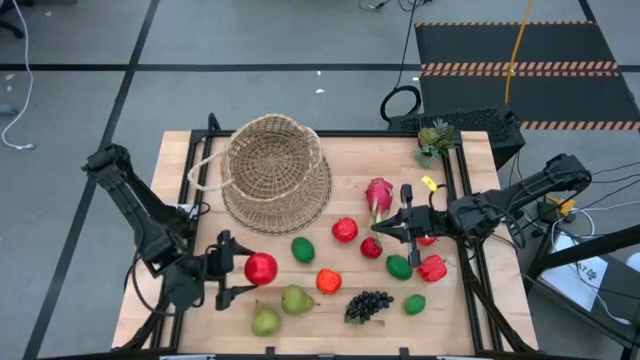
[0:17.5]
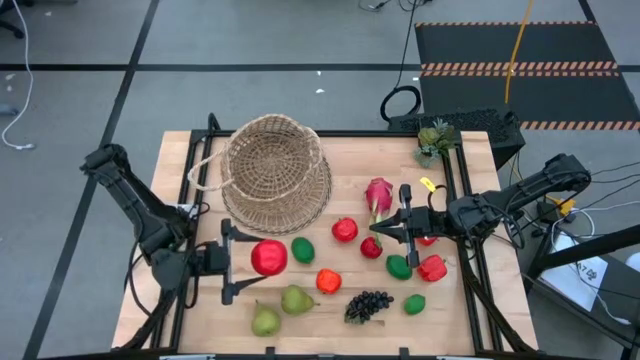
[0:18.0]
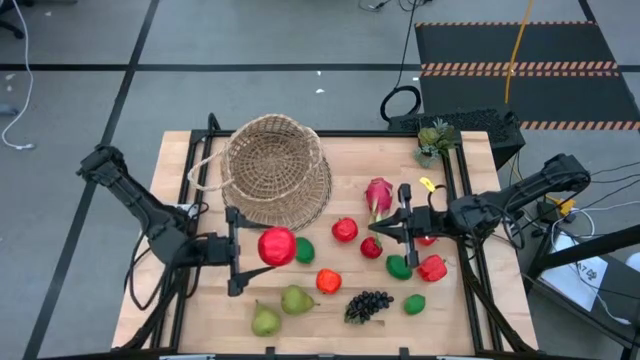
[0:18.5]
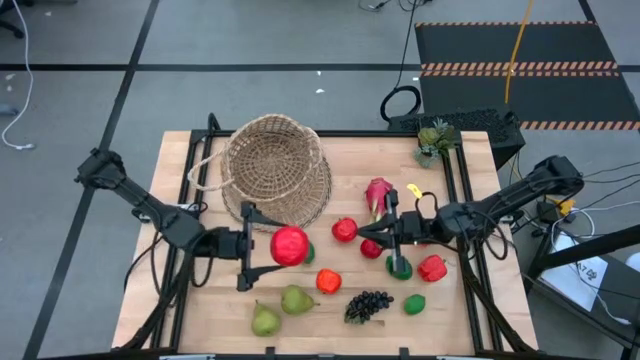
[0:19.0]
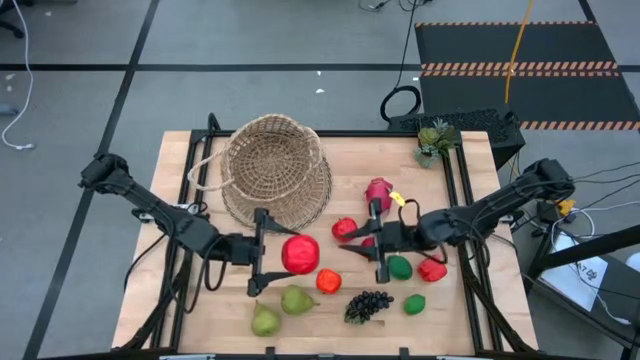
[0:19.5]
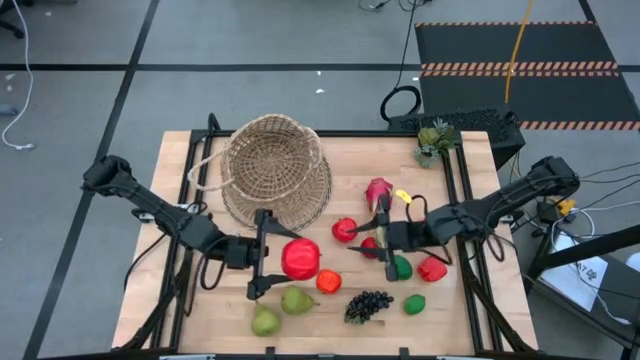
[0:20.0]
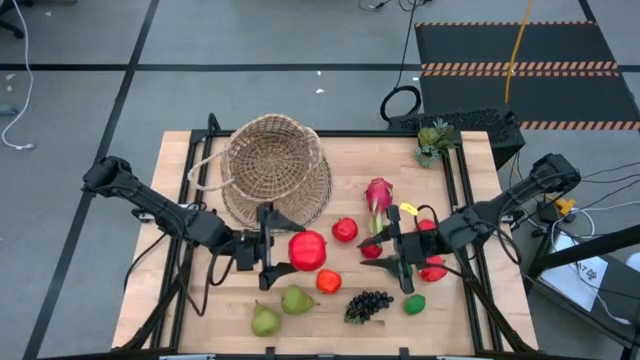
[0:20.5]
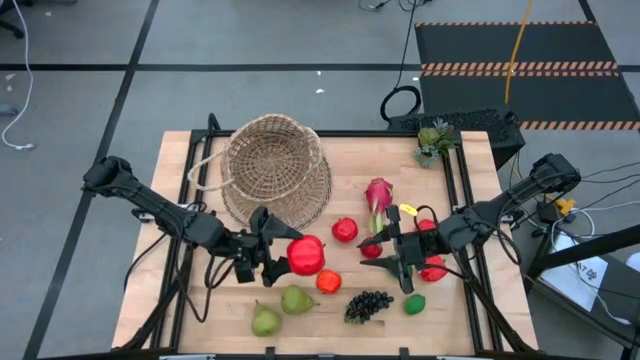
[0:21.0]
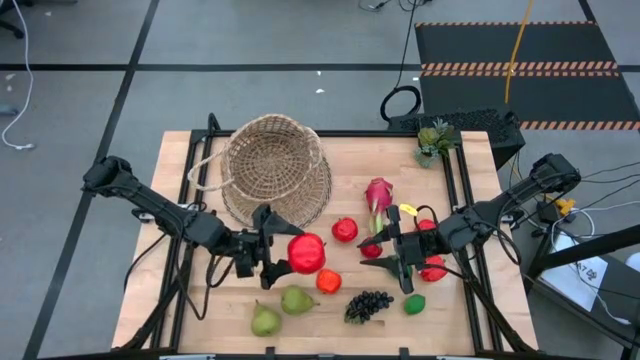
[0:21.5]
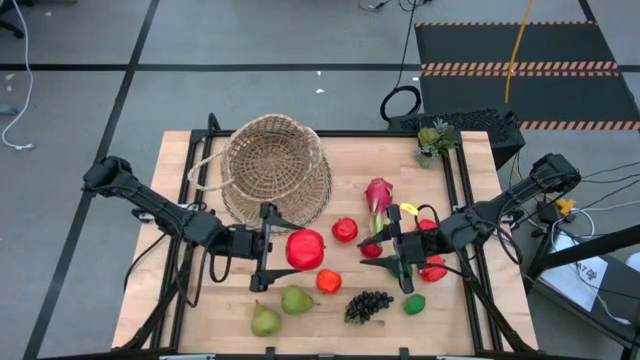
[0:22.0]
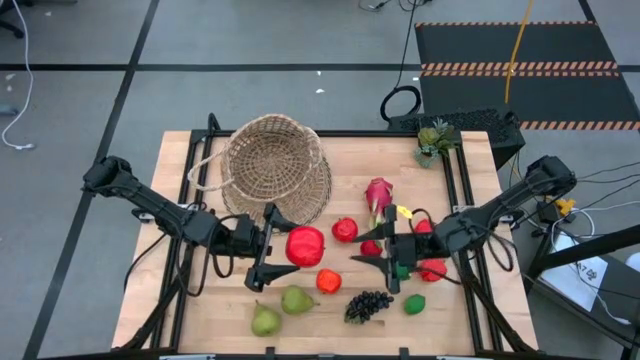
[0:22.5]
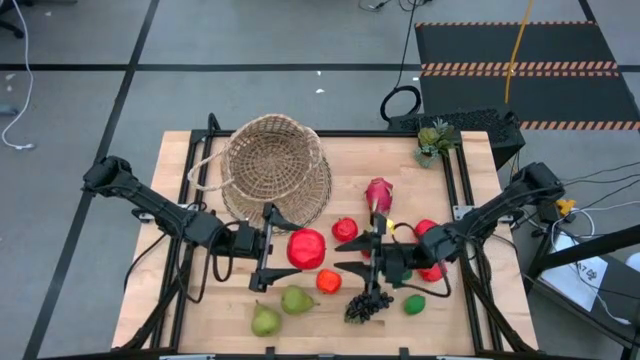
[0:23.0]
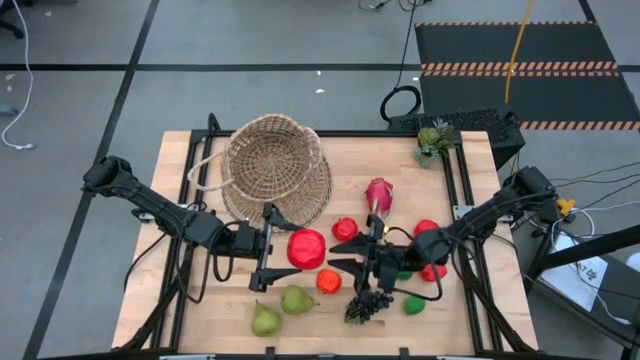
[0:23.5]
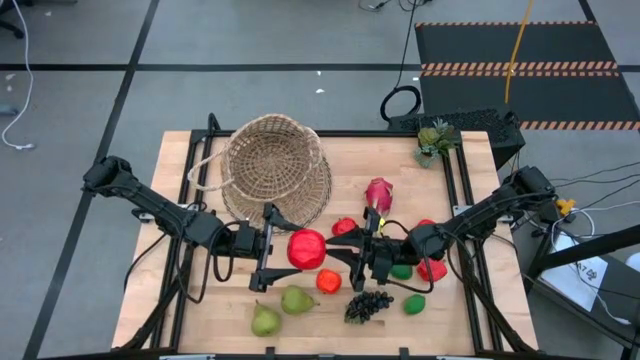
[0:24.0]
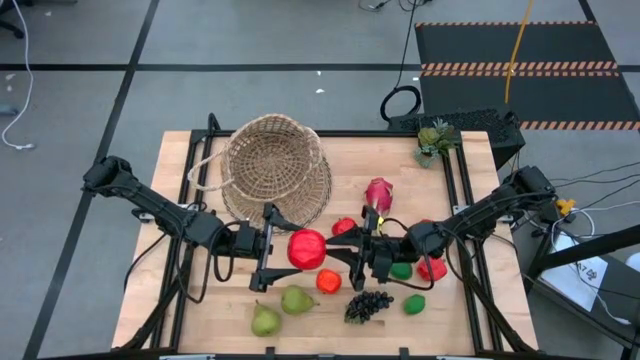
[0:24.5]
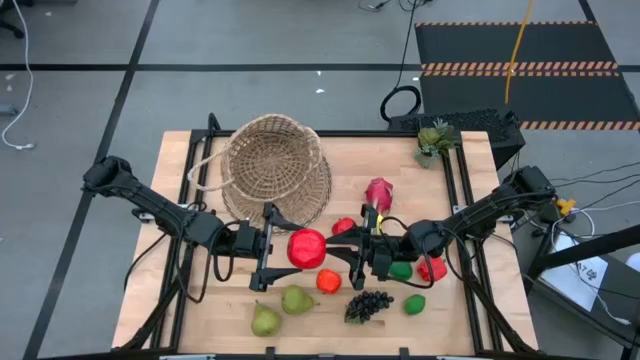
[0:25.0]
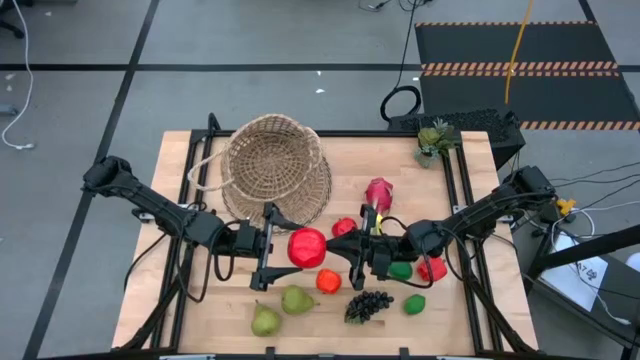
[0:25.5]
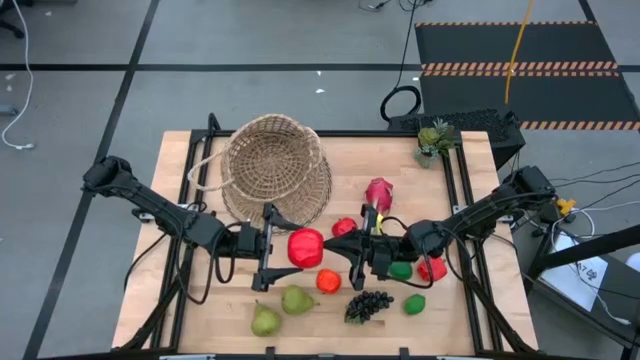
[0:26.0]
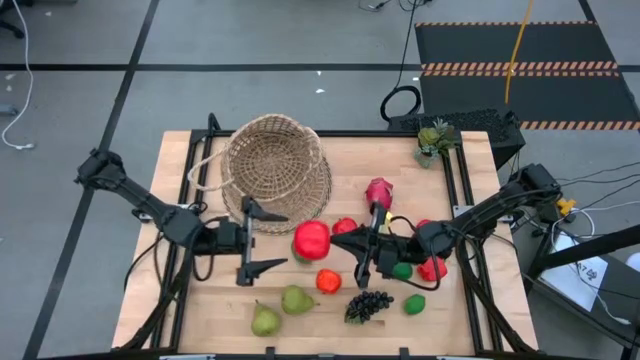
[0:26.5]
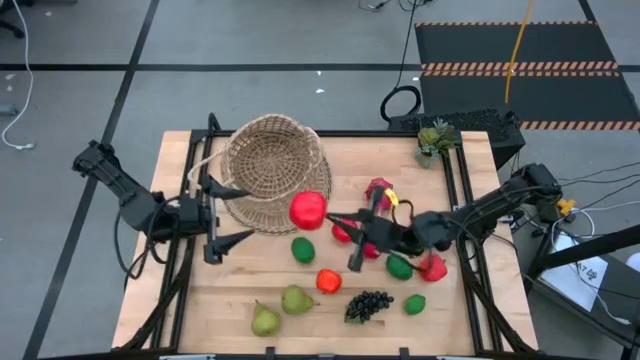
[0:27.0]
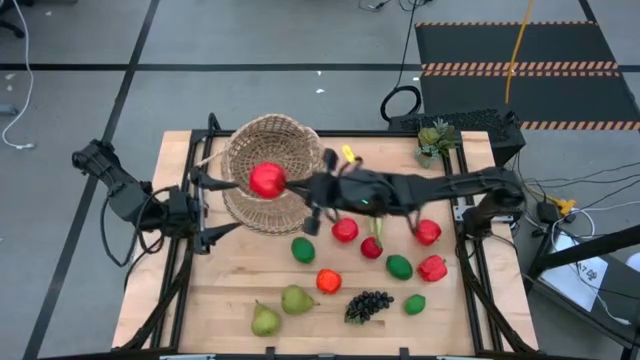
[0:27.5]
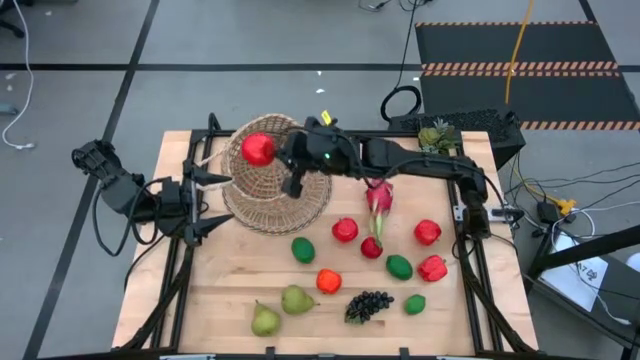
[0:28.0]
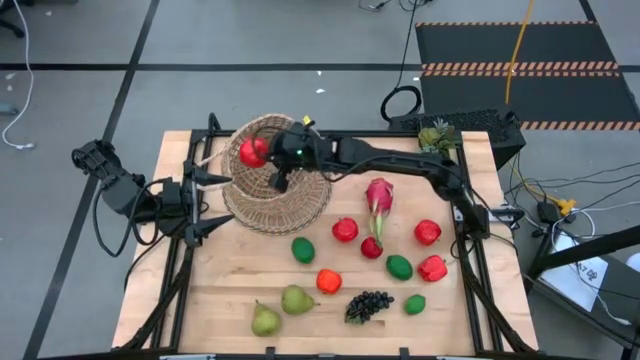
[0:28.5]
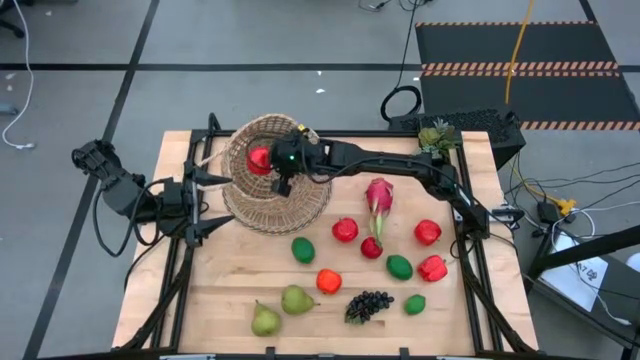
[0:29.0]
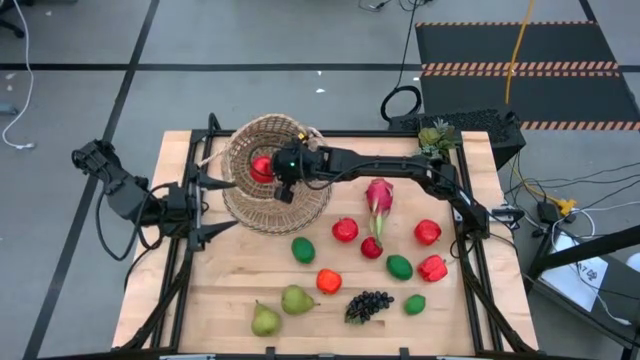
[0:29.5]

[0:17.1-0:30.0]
Task: Build produce basket
Put the apple into the basket

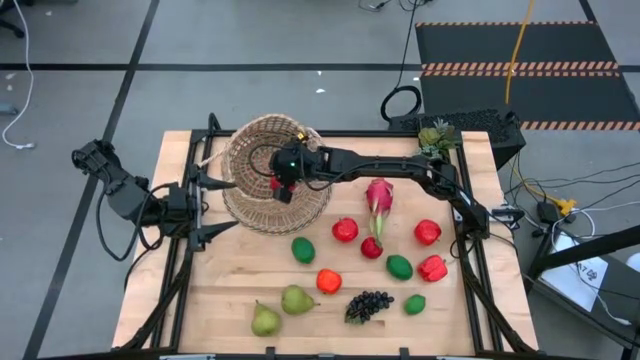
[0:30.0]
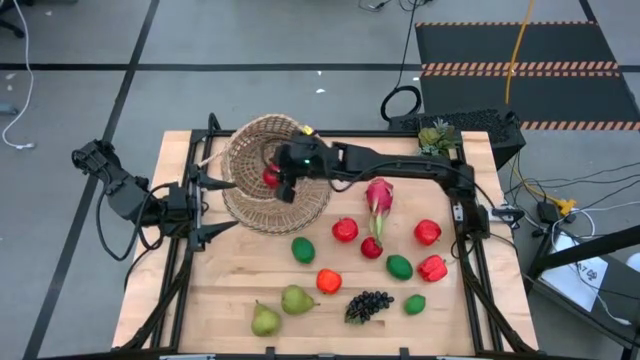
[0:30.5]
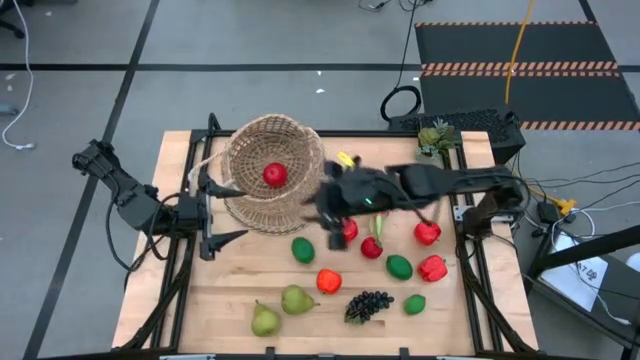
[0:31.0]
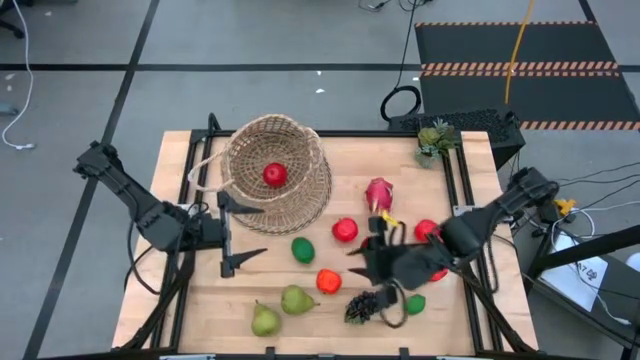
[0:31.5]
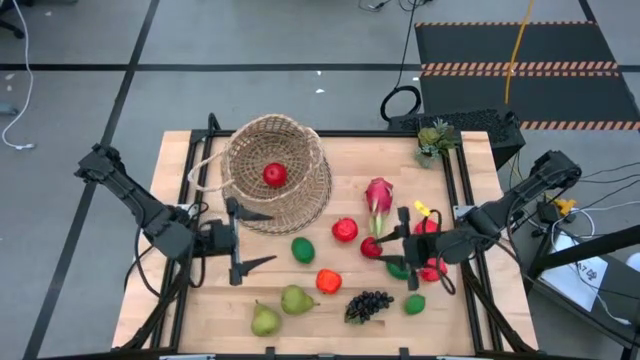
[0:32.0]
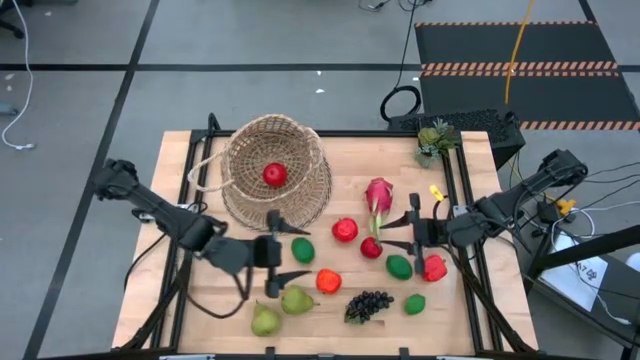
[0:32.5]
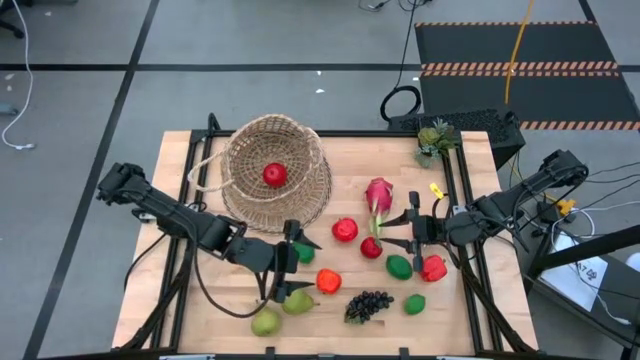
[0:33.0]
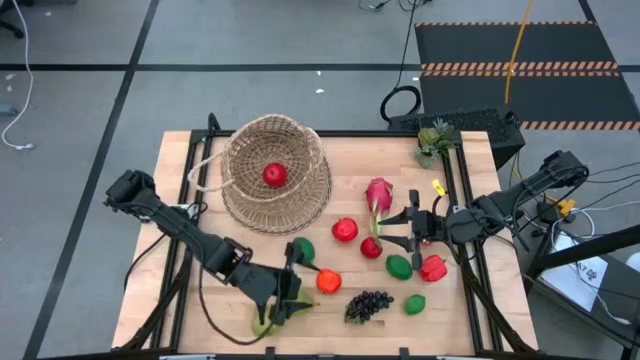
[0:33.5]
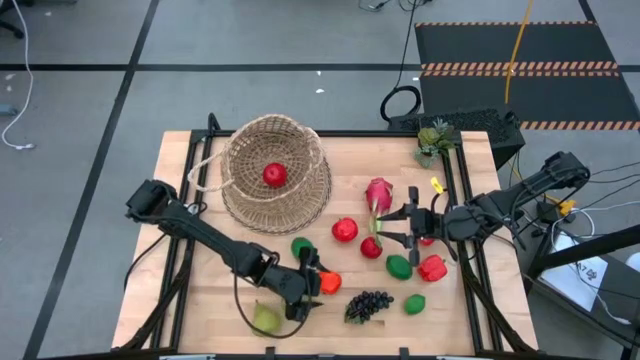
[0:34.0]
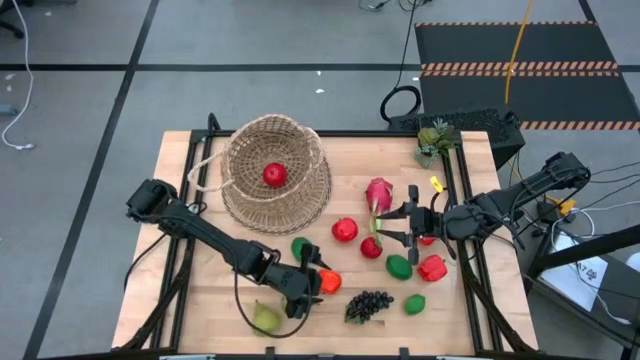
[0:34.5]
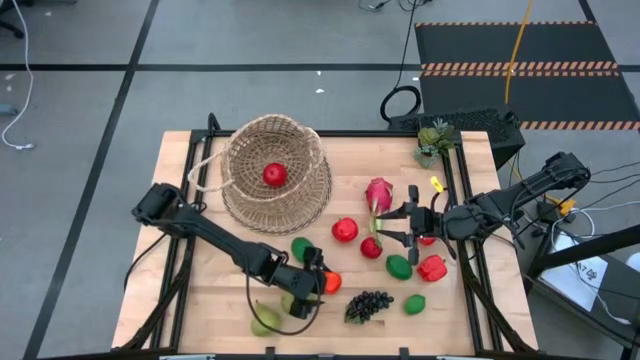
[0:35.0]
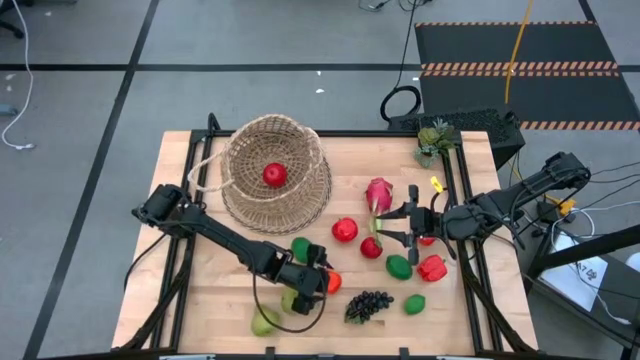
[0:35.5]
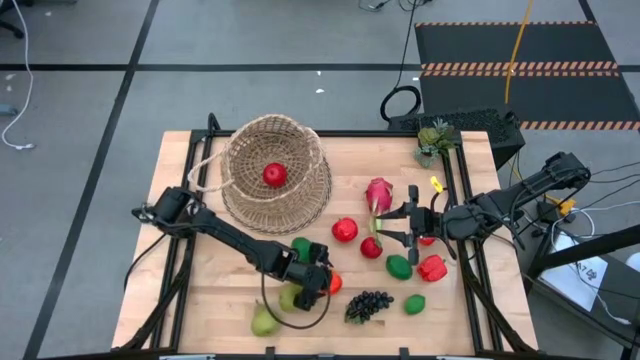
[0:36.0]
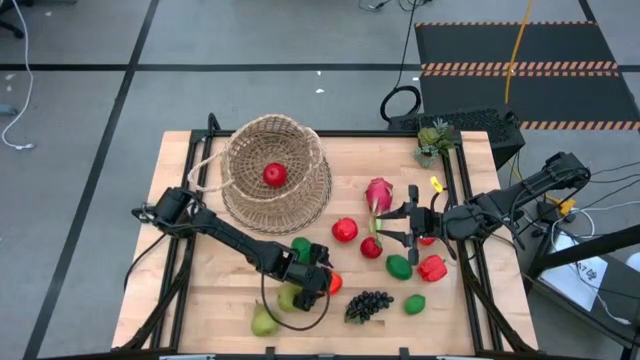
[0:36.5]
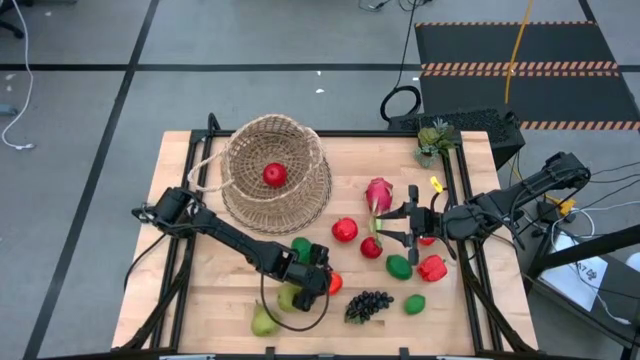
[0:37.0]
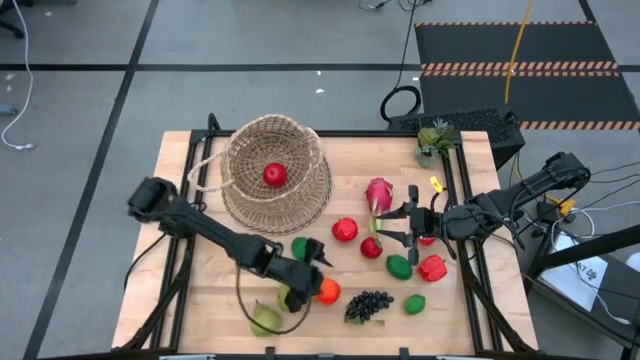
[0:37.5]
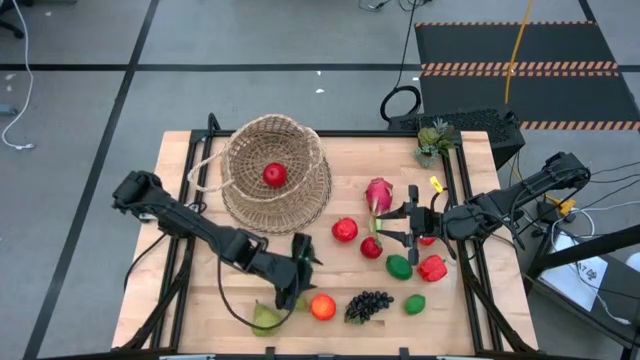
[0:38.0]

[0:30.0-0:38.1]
Put the apple into the basket
